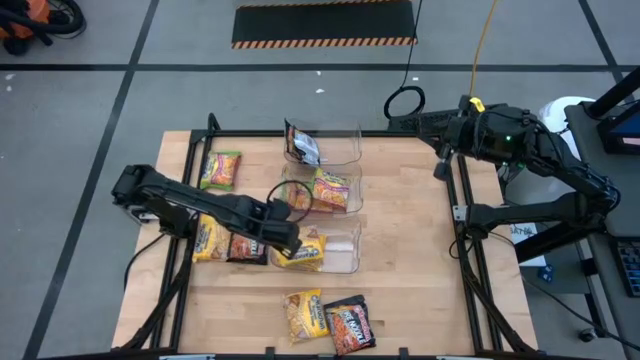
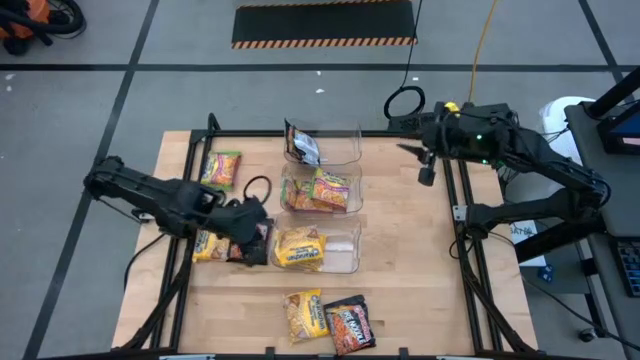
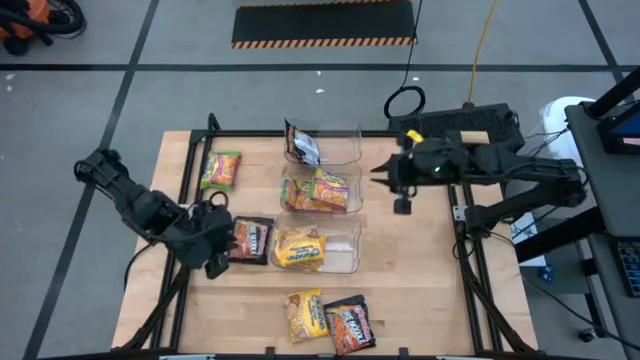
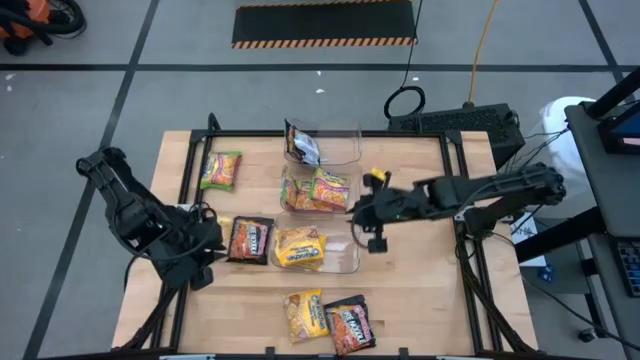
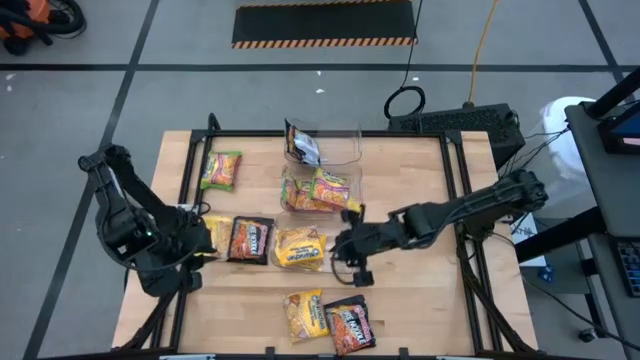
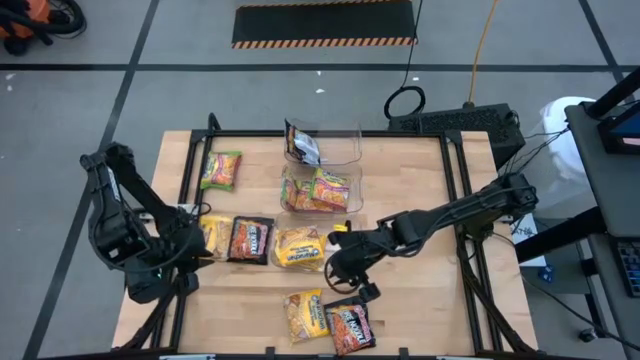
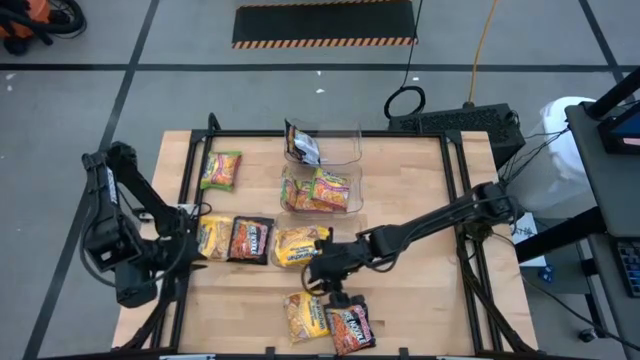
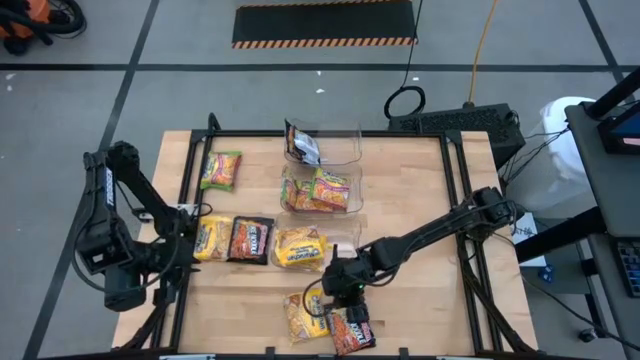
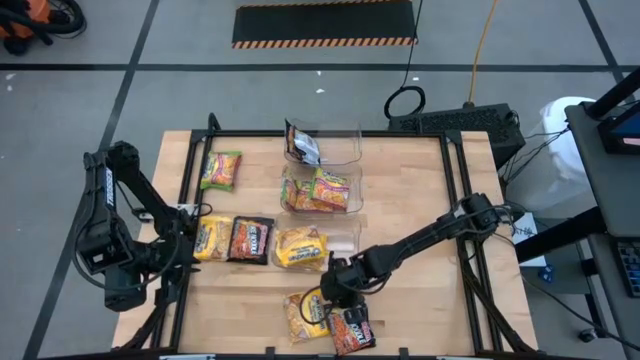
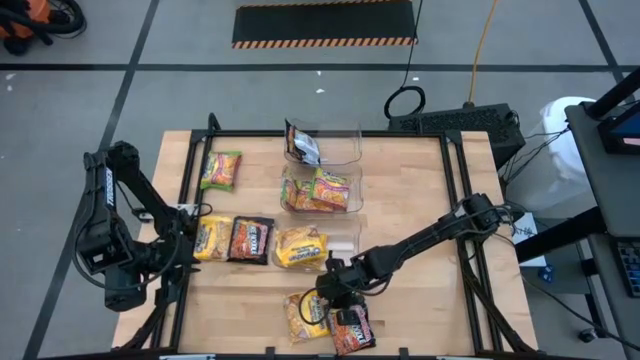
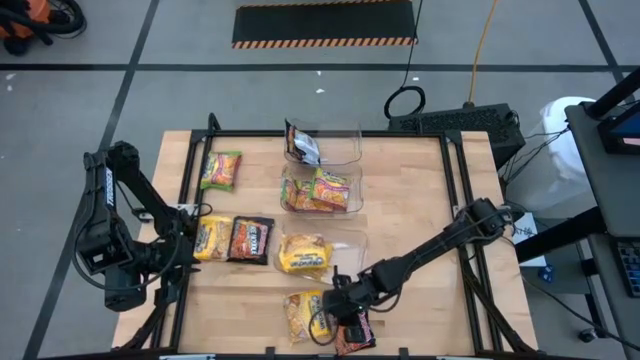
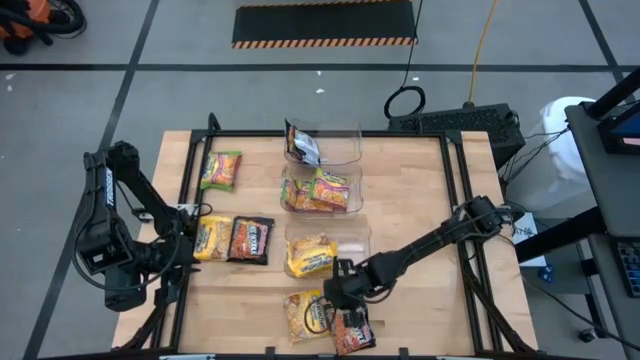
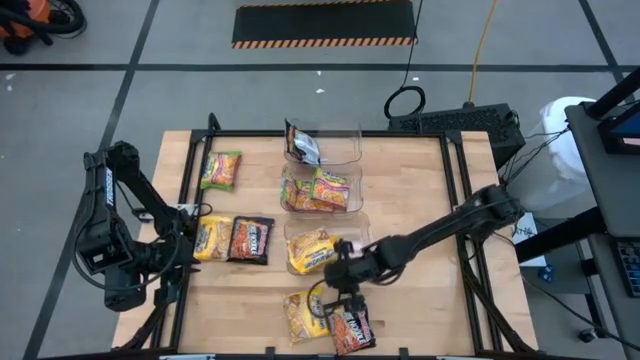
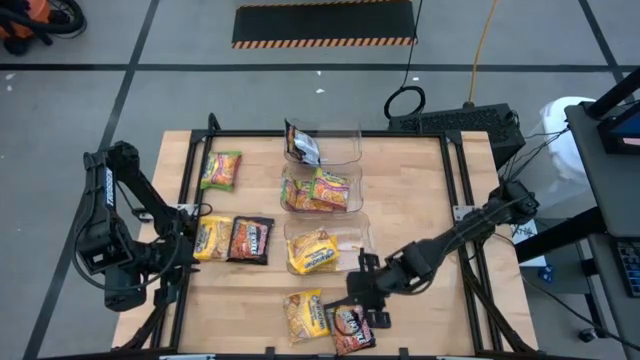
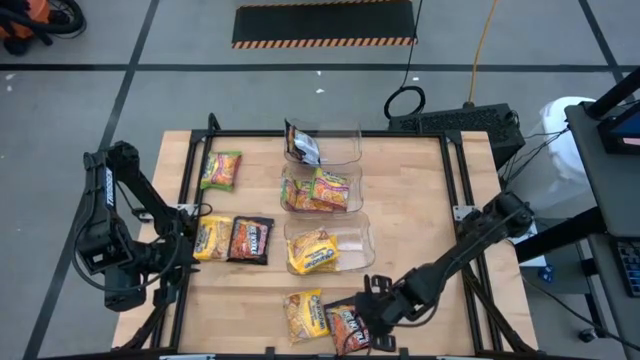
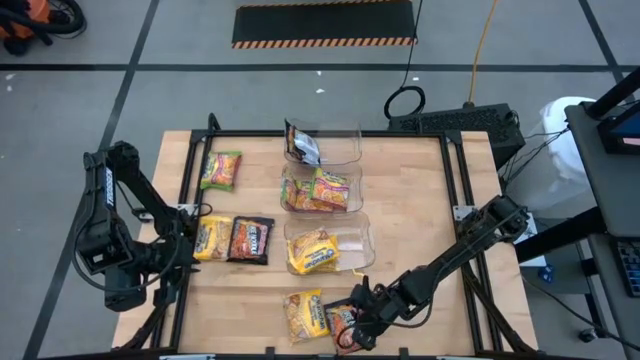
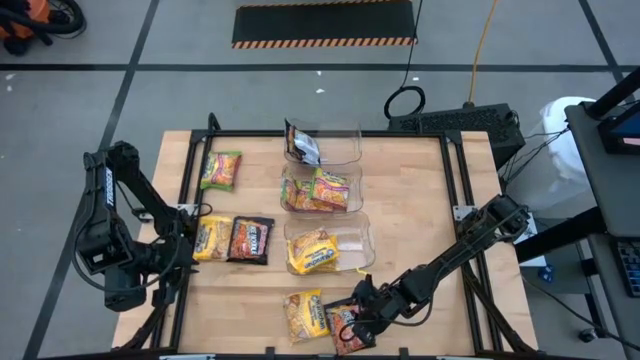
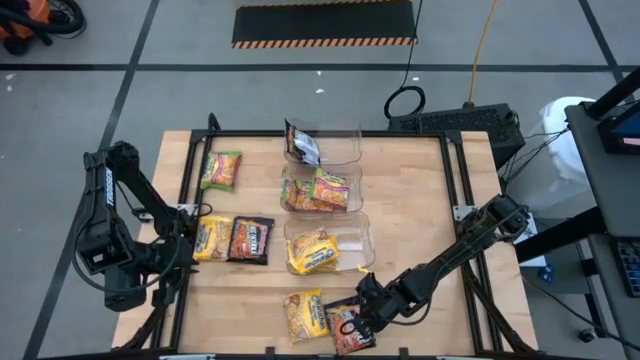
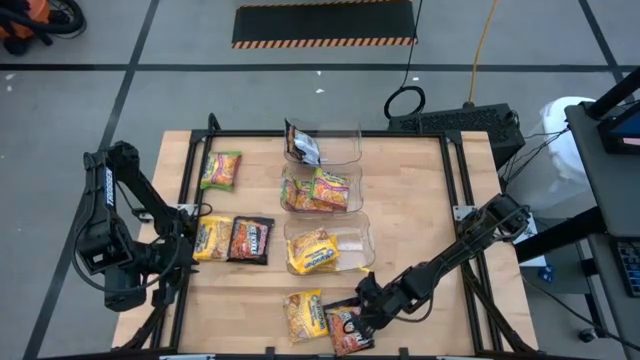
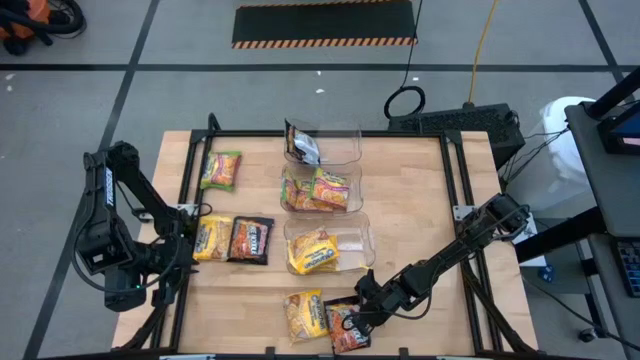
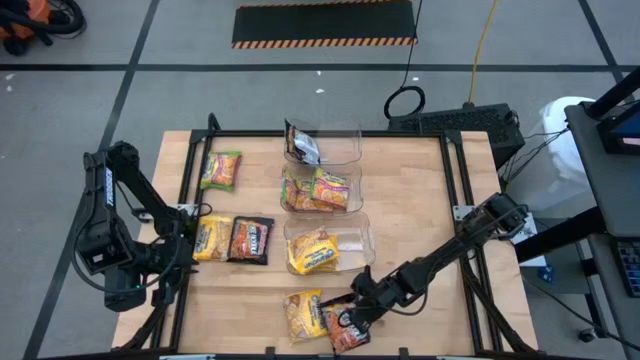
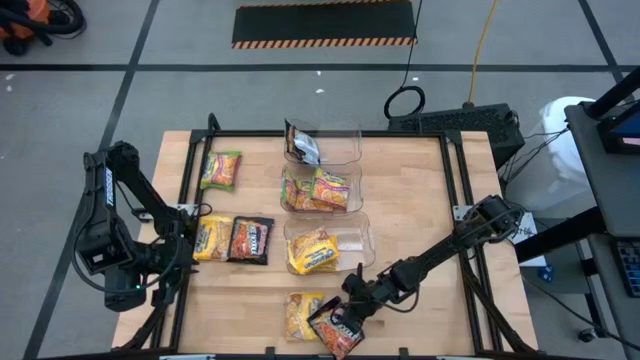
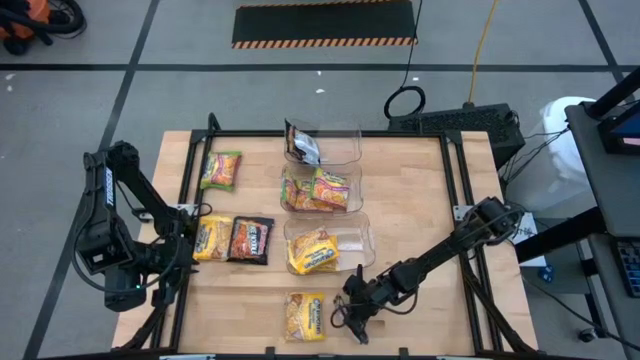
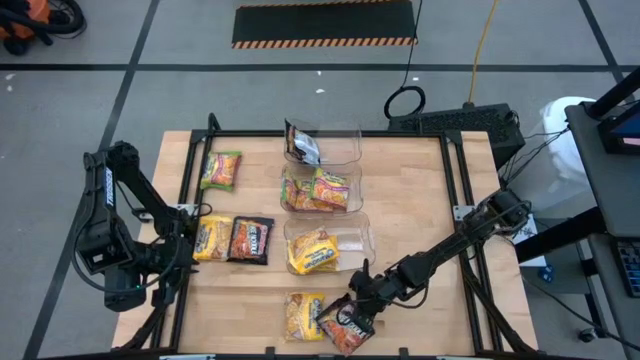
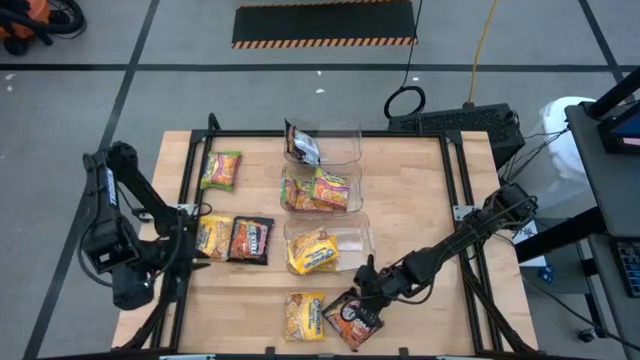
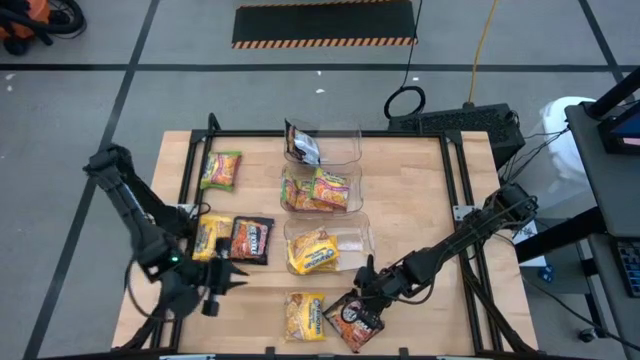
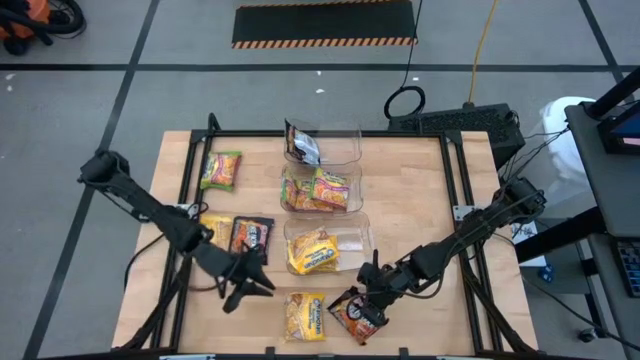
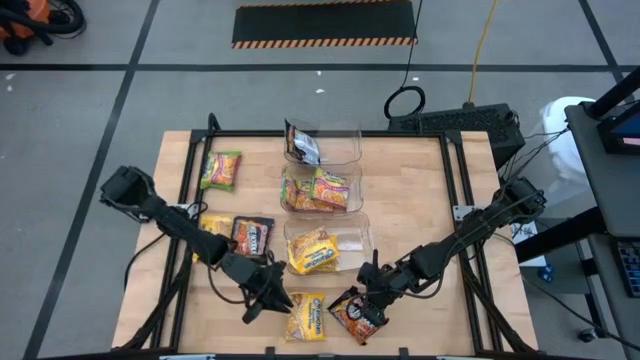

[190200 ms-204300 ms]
Task: Sort Maruchan noodles
Put the black noodle pack into the top transparent bin

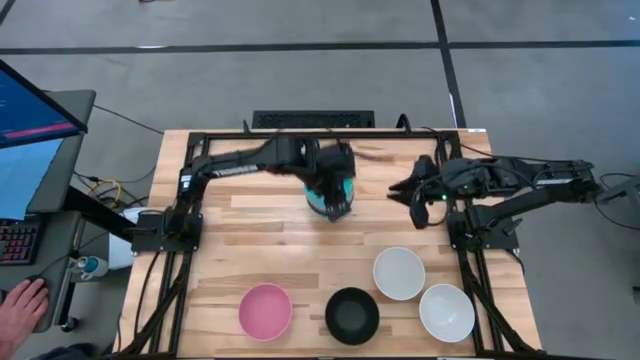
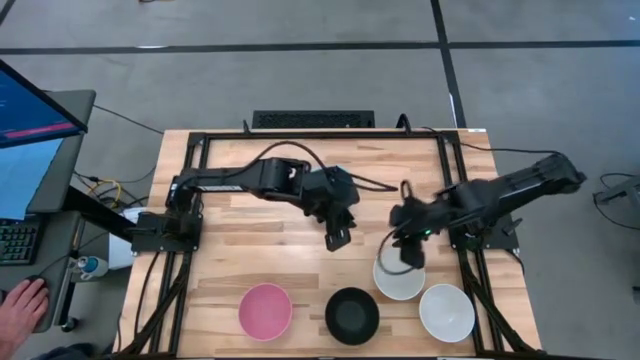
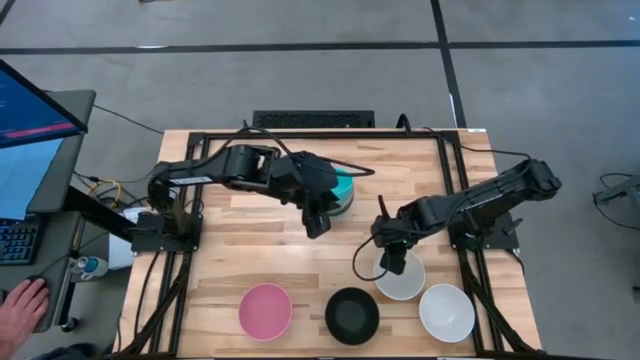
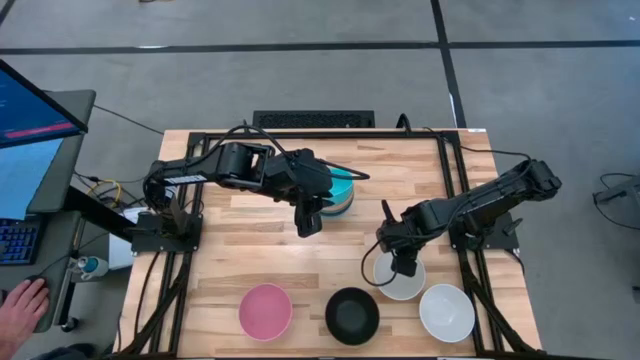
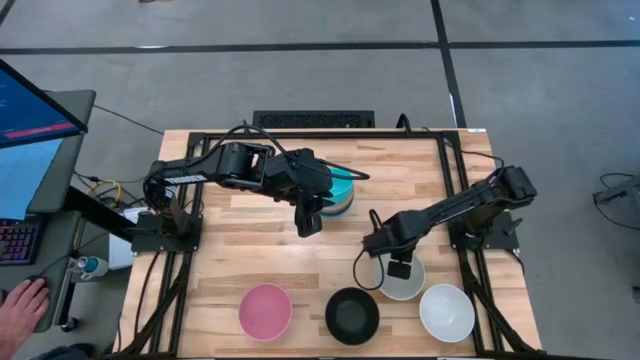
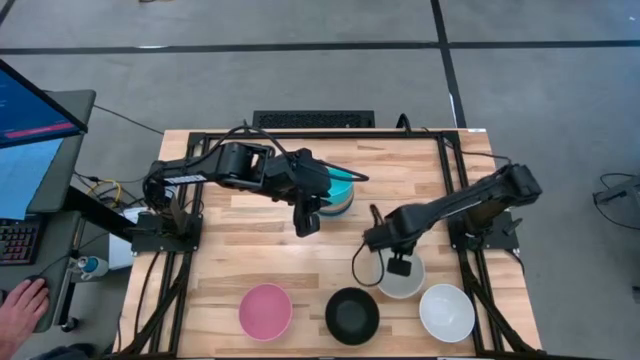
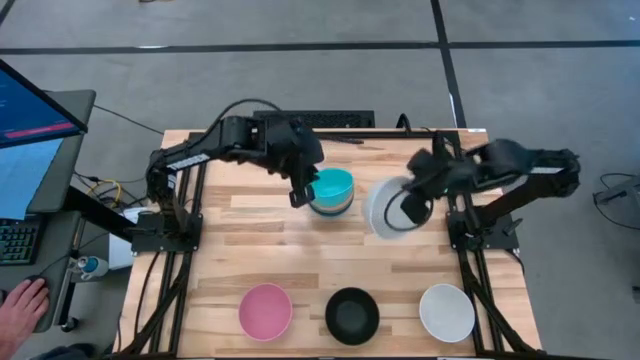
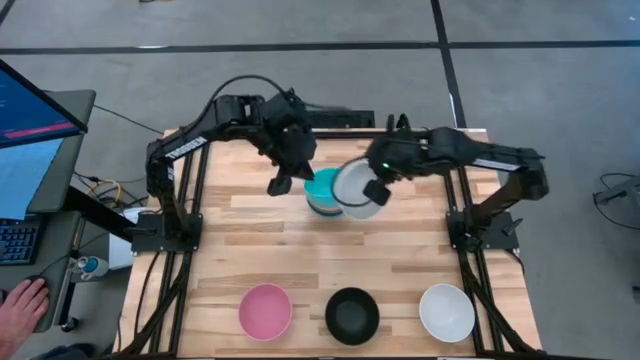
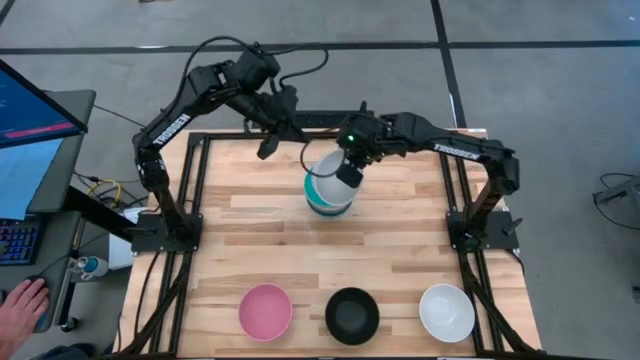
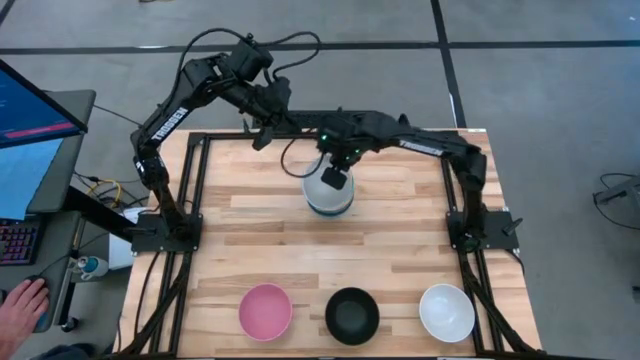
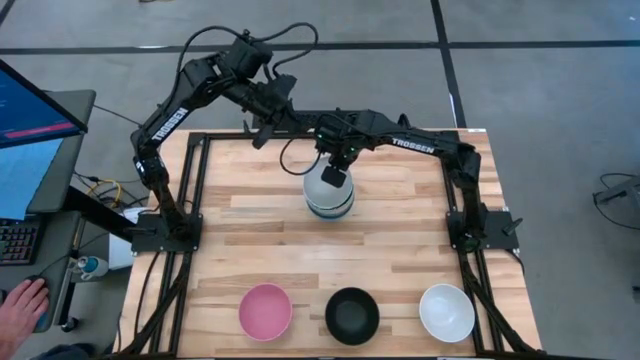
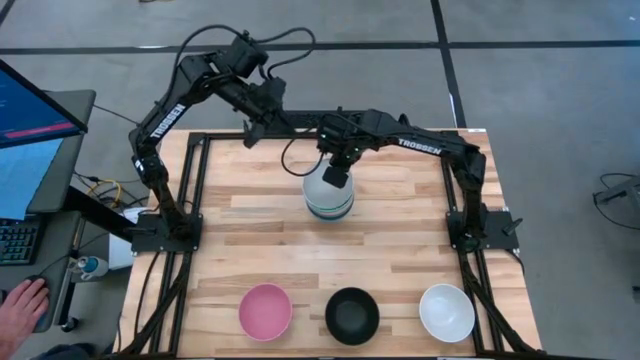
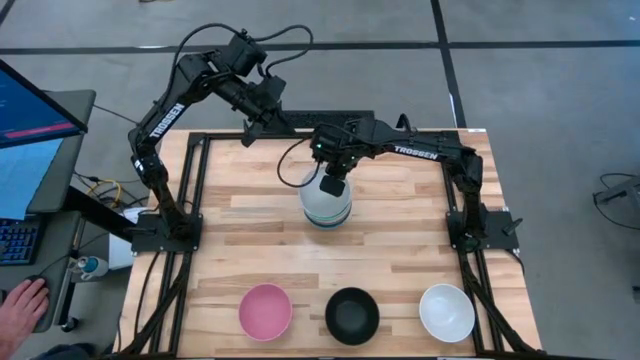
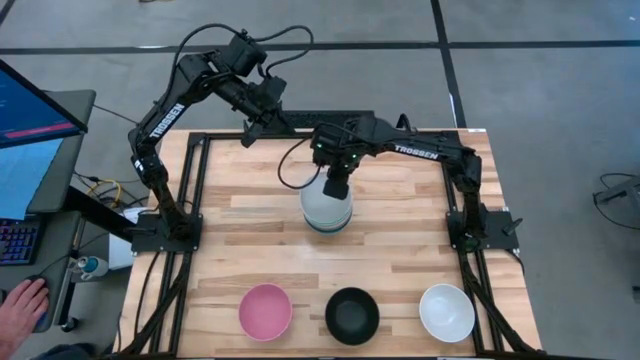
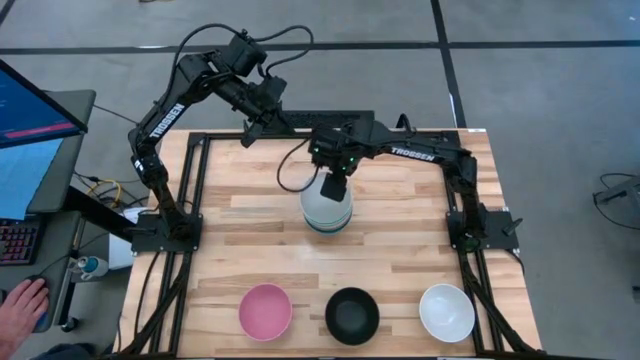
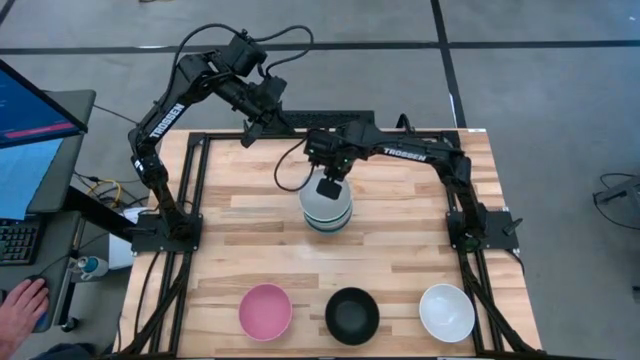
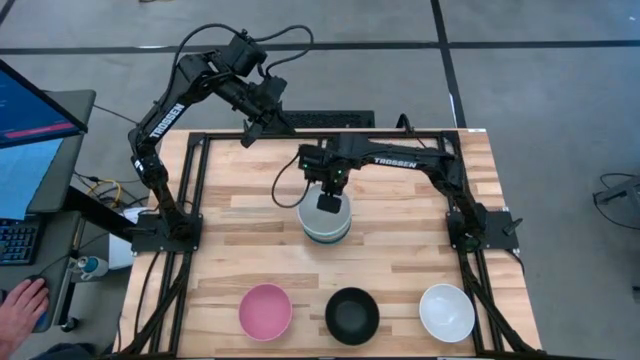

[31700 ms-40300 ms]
Task: Nest bowls inside each other
Stack the gray bowl on top of the light blue bowl
